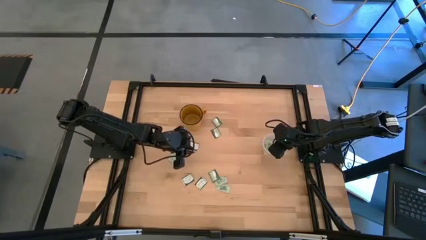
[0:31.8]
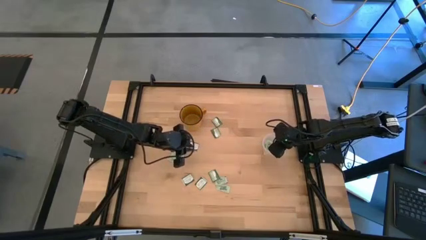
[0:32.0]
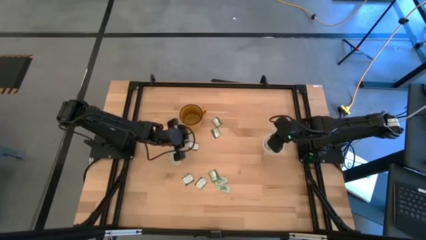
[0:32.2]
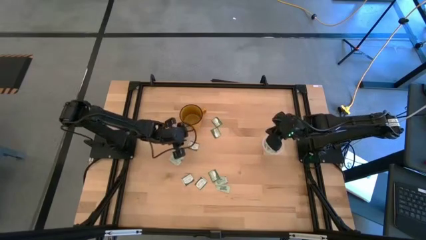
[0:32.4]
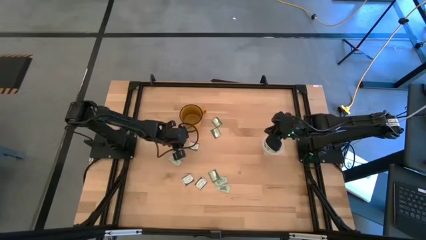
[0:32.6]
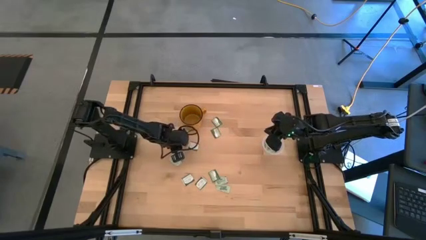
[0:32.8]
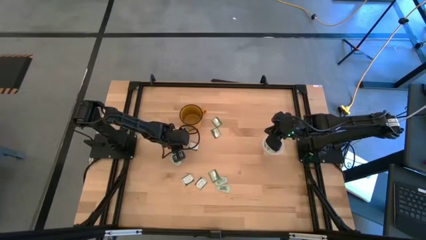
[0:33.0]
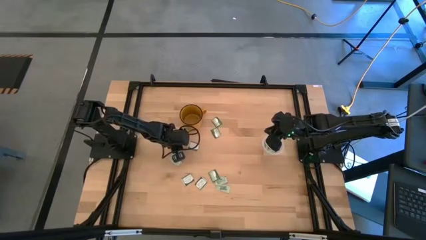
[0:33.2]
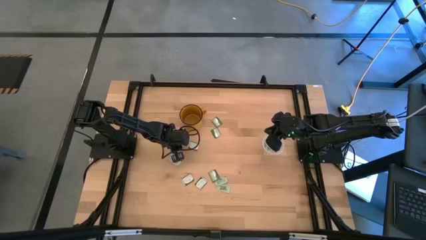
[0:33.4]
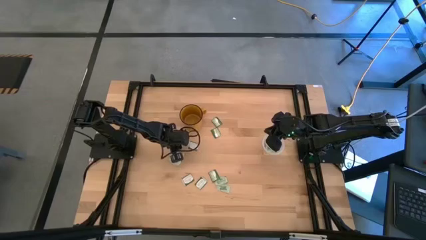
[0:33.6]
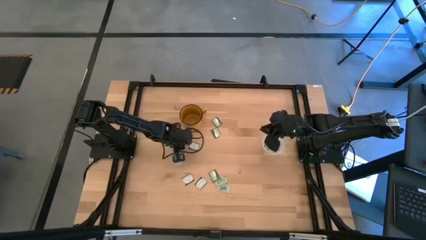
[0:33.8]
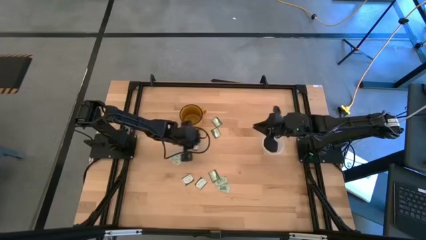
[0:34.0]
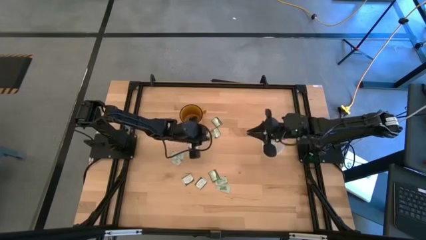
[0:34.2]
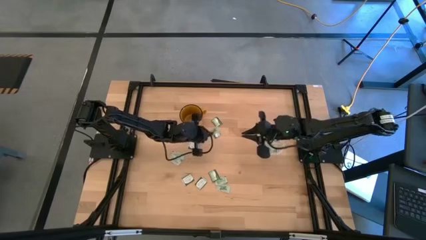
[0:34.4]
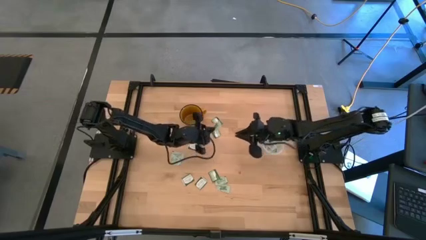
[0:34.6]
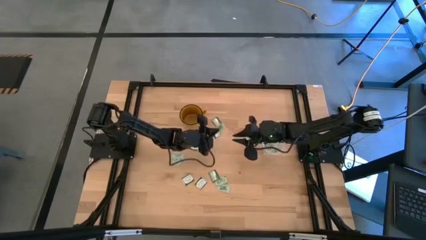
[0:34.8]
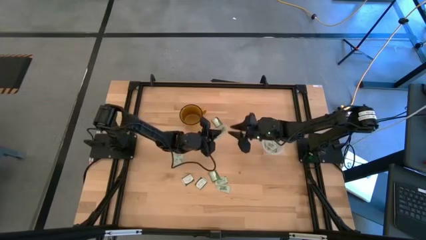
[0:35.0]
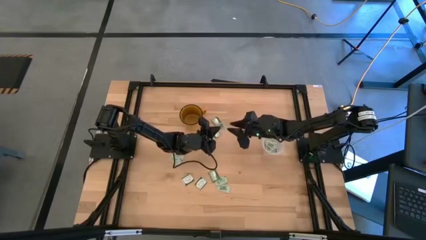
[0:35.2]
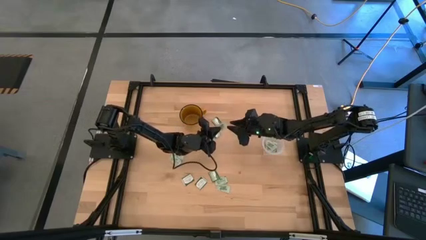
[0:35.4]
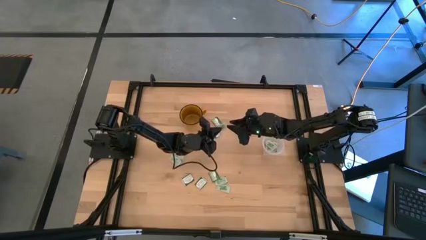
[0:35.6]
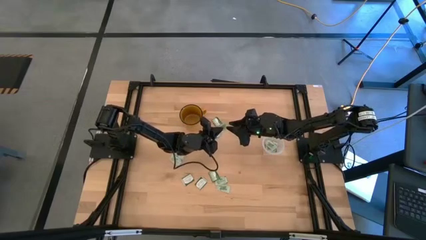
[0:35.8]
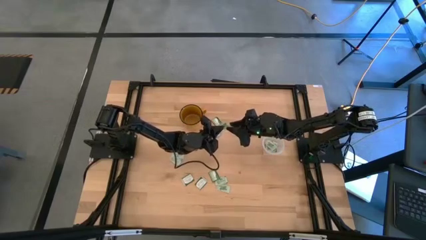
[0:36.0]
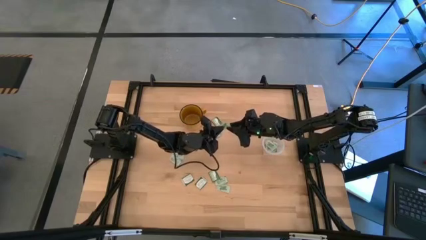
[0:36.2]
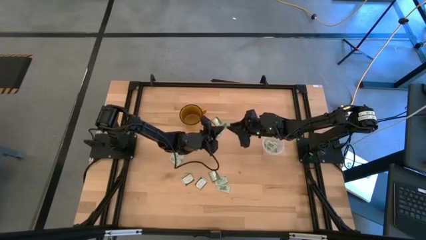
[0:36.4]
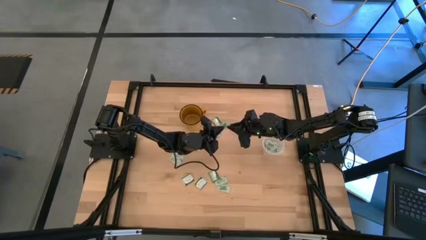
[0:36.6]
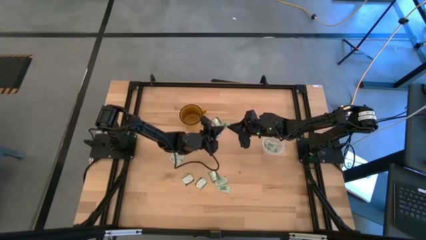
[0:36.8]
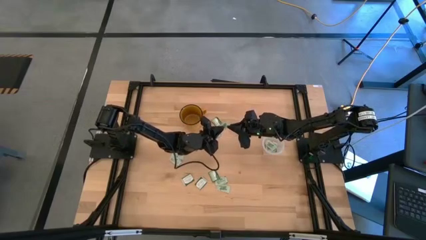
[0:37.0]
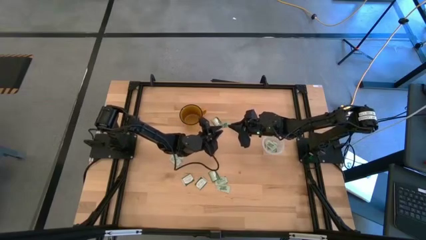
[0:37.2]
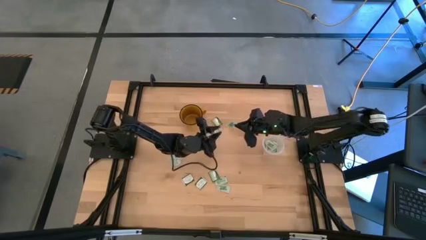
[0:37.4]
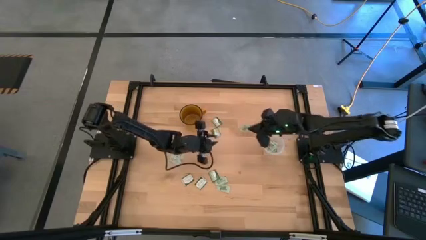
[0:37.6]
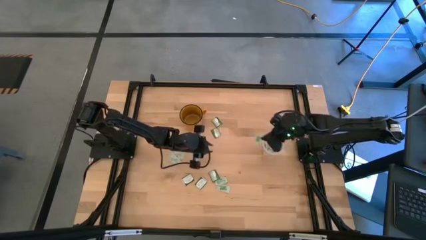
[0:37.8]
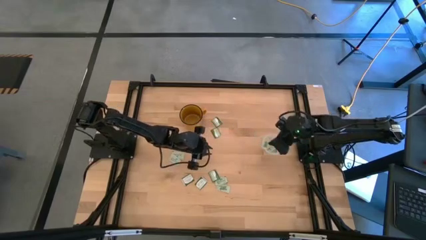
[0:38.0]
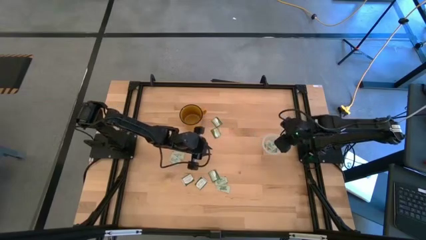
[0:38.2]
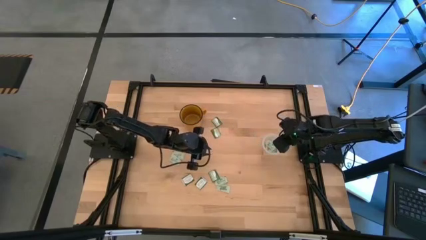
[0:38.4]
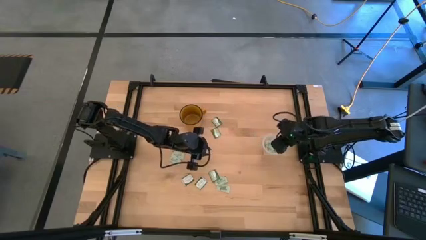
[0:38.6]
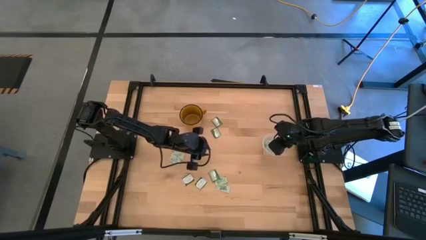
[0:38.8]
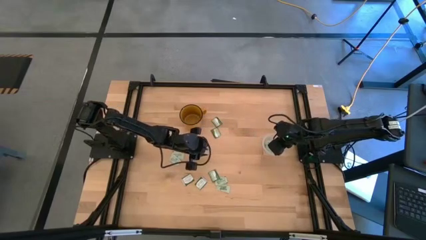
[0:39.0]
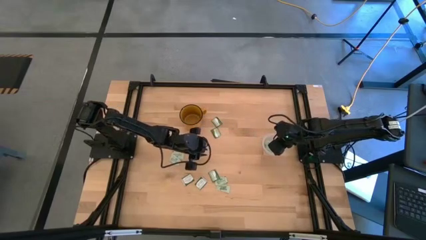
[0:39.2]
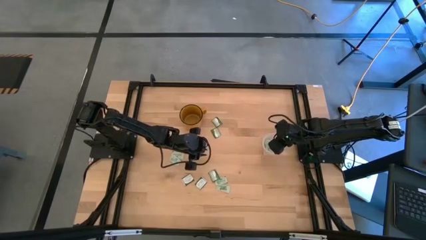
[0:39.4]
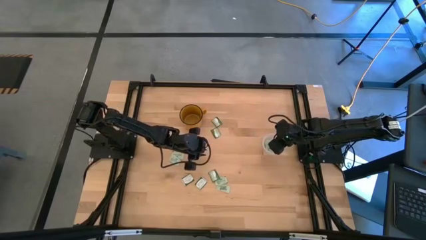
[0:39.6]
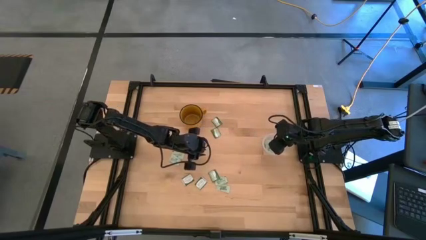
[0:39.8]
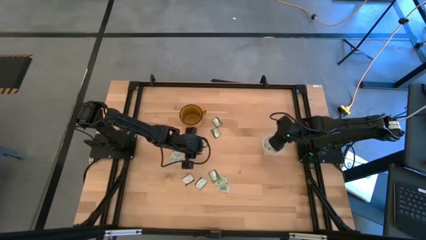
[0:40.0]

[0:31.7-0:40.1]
Task: Pick and place items into bin
Put the stevia packet into the transparent bin

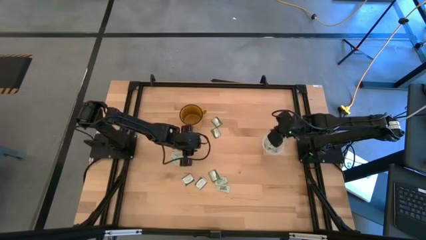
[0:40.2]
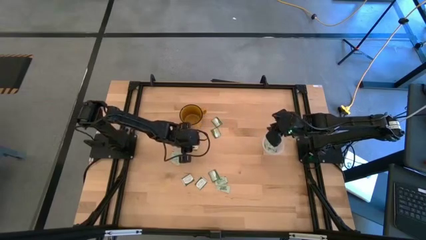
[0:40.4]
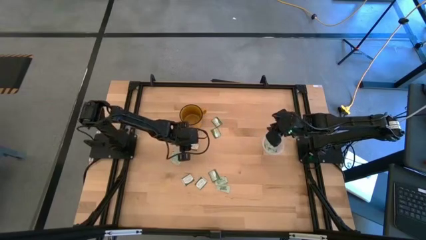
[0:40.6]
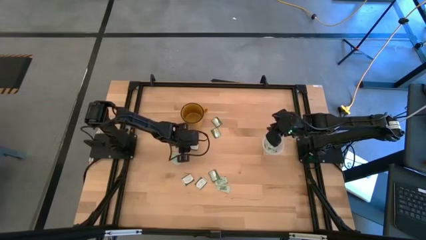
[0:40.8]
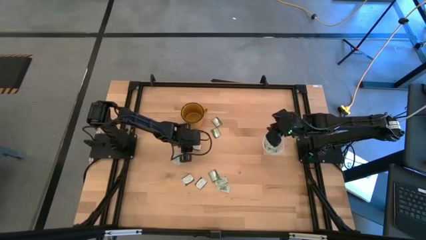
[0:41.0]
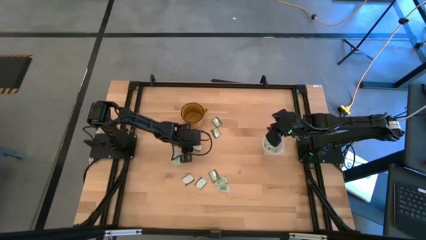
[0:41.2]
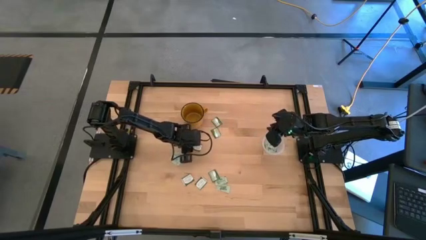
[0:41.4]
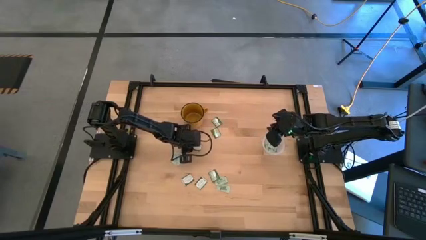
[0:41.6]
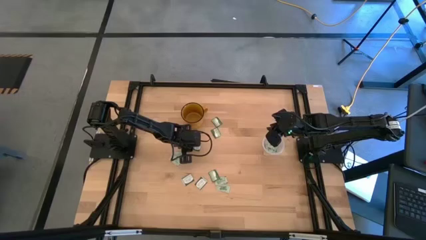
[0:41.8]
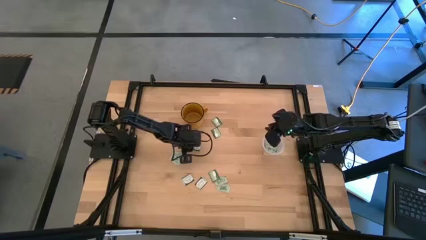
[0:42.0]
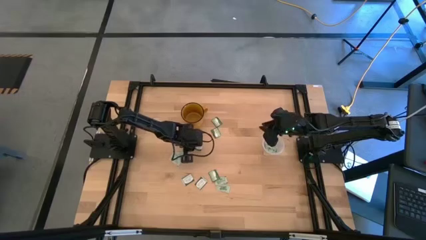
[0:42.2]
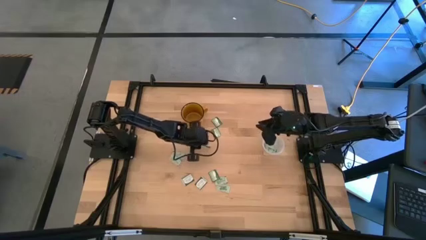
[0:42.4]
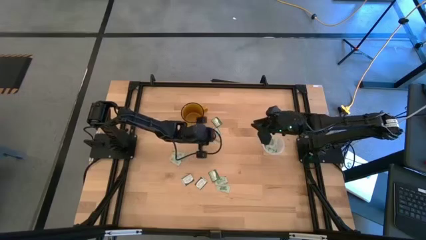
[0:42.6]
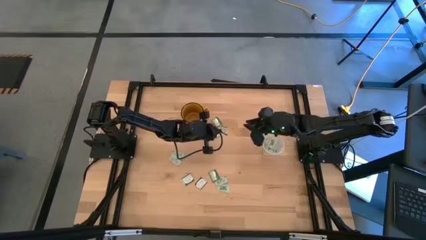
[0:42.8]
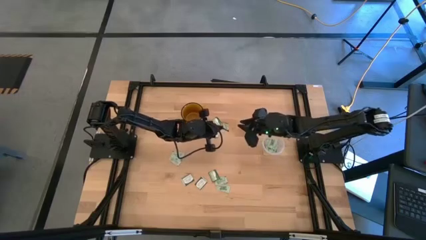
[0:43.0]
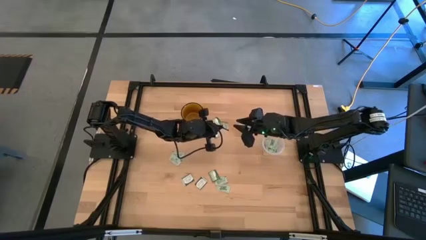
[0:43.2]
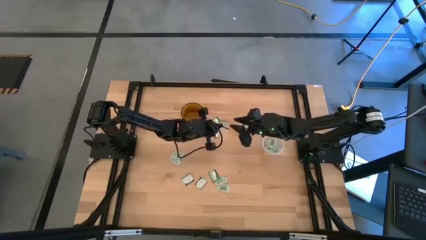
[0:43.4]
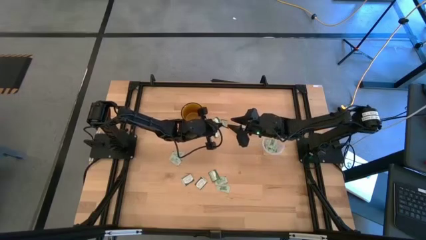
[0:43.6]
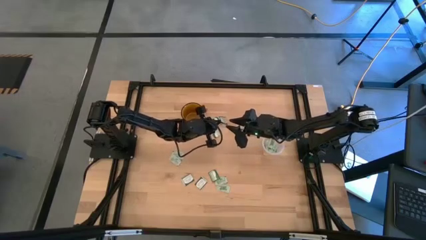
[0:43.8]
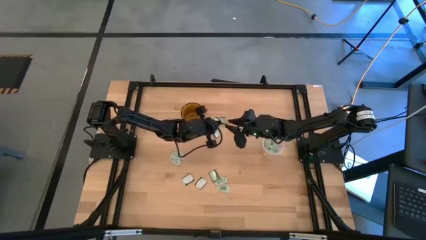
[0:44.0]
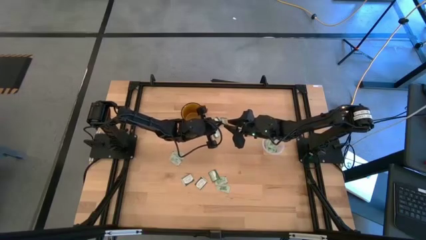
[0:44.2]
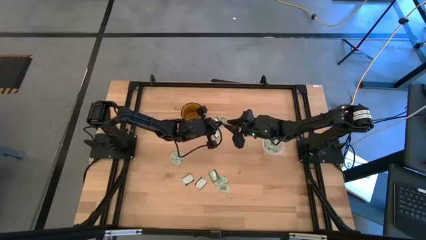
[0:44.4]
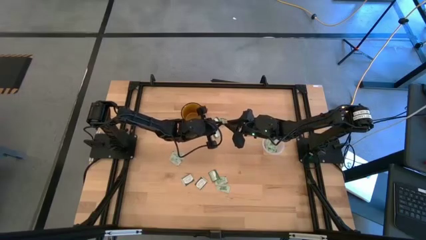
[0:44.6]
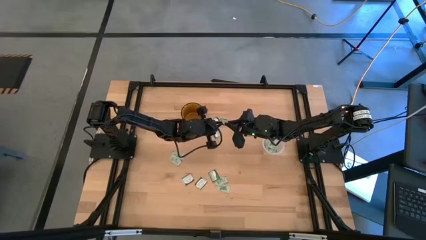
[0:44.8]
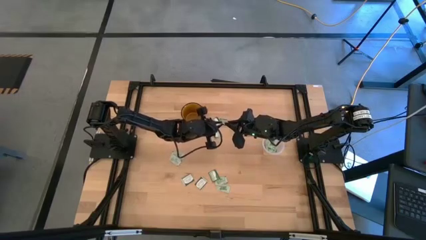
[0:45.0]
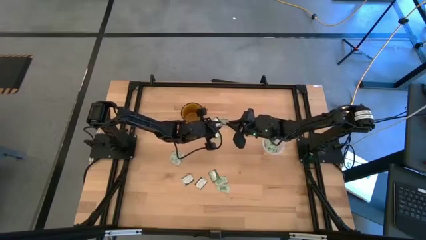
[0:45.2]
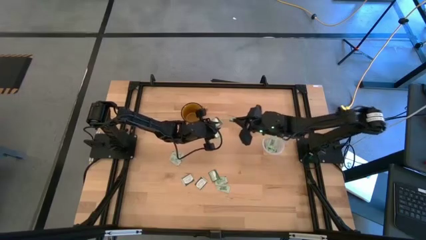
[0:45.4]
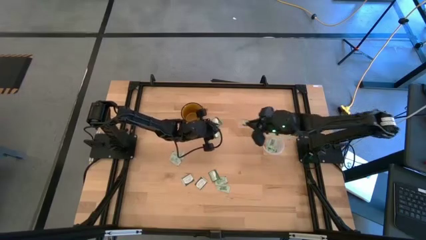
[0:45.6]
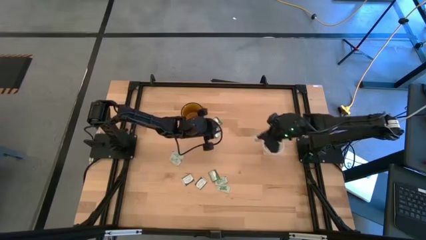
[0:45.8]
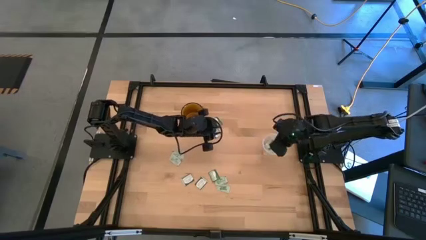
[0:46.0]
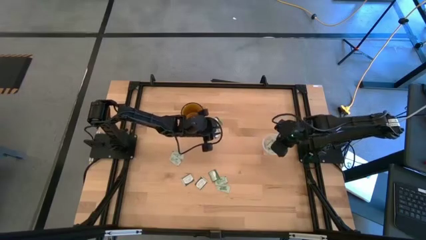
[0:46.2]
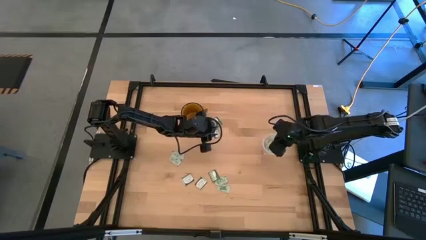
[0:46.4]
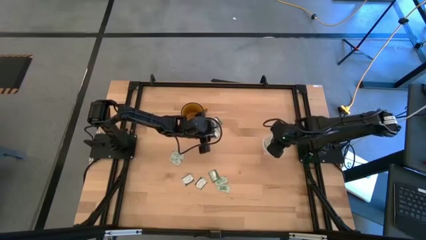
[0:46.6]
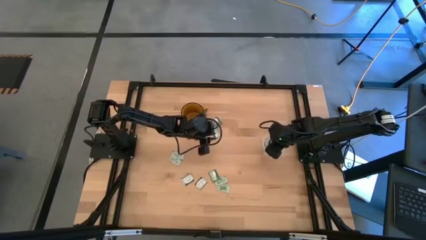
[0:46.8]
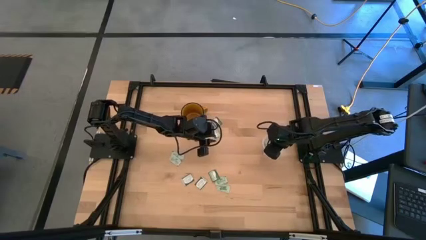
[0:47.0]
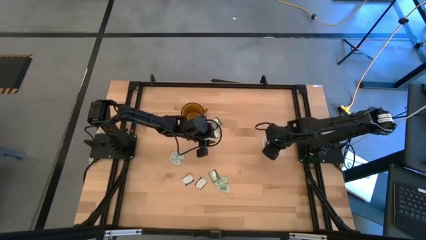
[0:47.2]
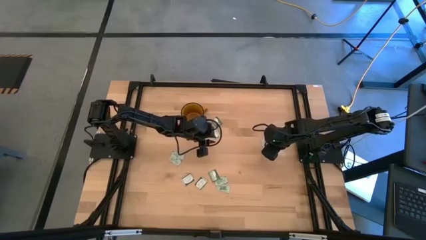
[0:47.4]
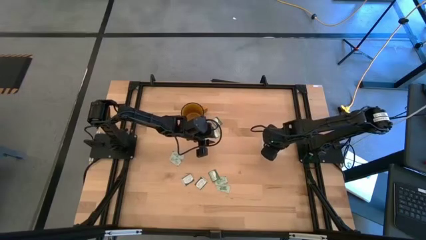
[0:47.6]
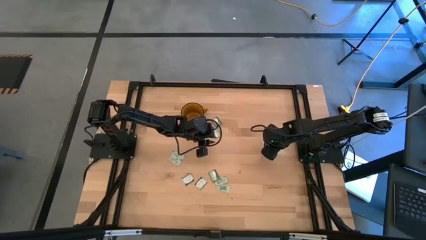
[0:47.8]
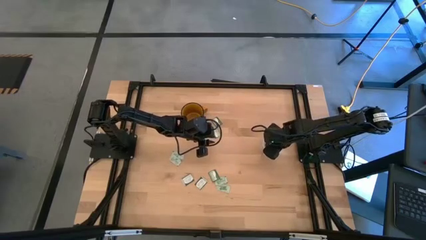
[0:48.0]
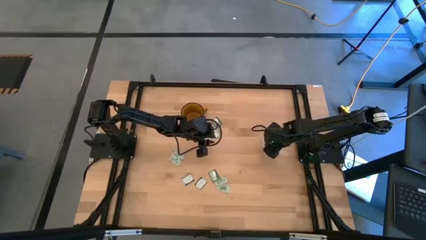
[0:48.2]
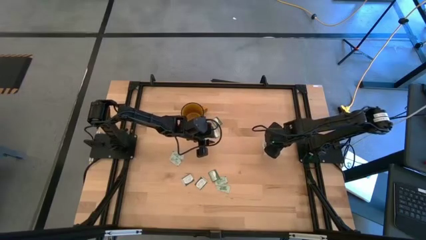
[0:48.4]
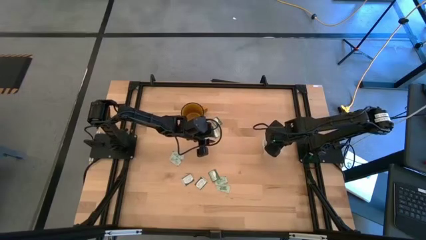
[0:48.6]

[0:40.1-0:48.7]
Put the truvia packet into the transparent bin

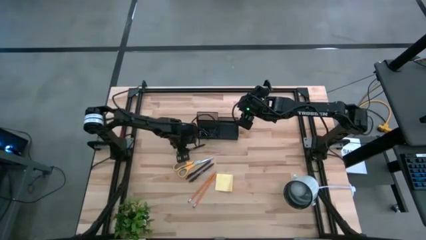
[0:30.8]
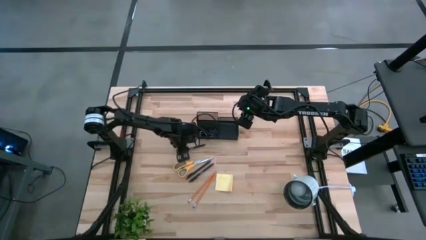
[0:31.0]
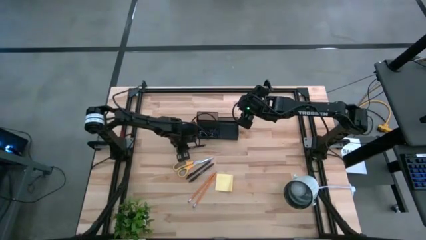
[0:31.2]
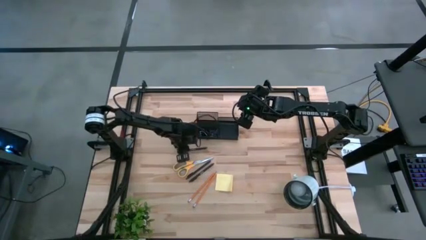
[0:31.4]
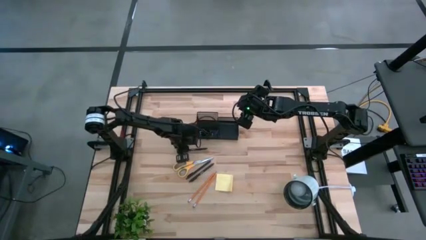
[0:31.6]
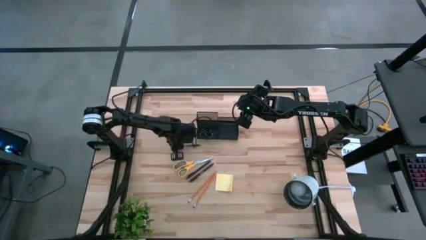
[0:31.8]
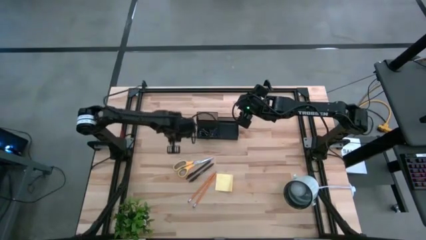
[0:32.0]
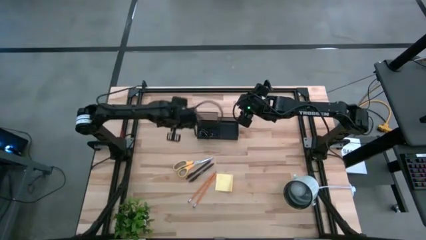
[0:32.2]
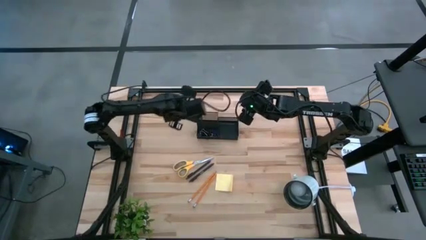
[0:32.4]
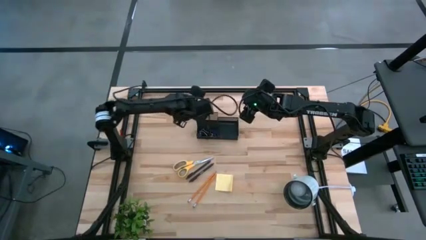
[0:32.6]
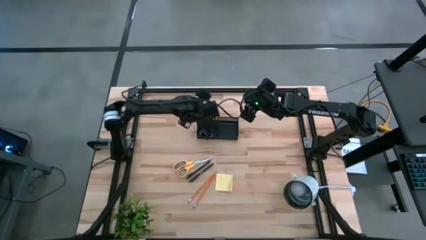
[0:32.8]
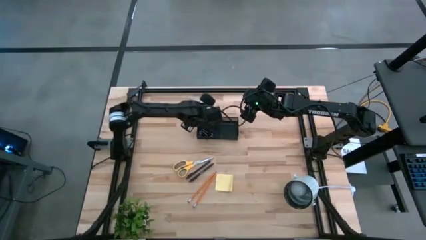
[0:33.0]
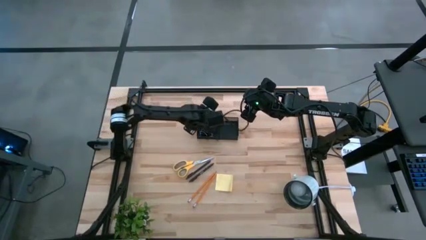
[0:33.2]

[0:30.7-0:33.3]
Task: Pick and place office supplies into organizer
Put the top black pen into the black organizer bin
